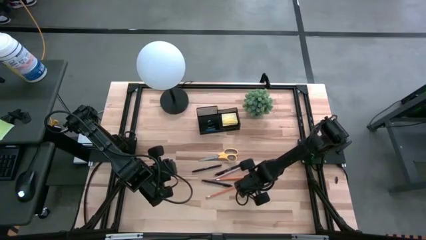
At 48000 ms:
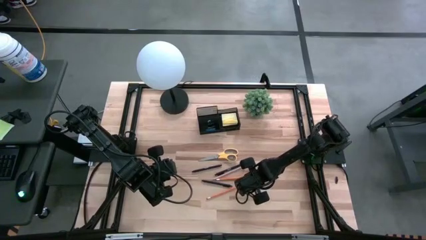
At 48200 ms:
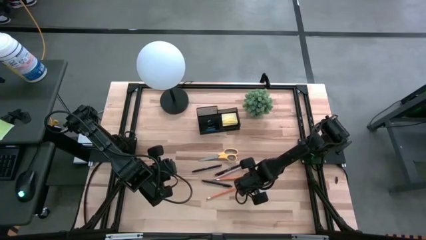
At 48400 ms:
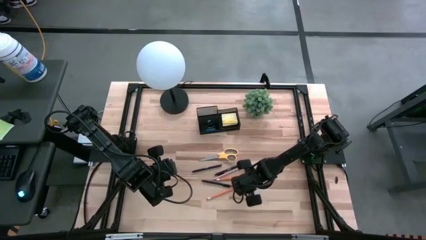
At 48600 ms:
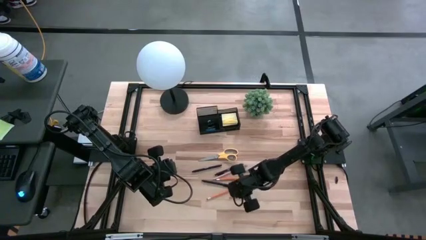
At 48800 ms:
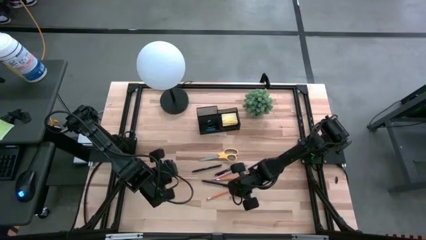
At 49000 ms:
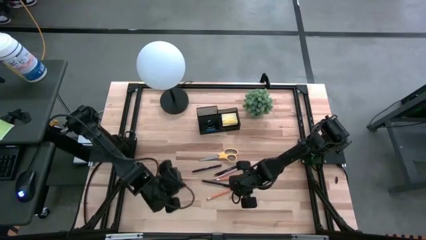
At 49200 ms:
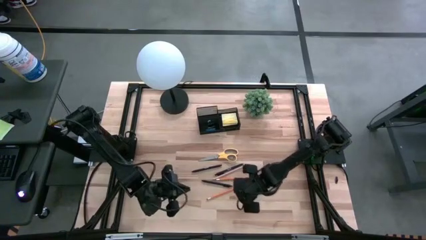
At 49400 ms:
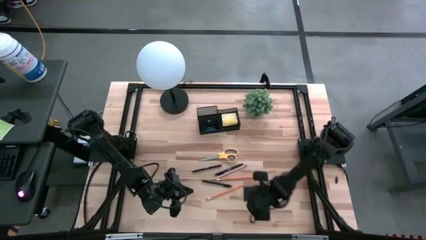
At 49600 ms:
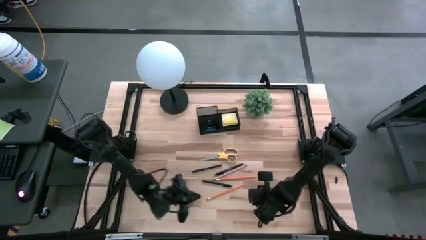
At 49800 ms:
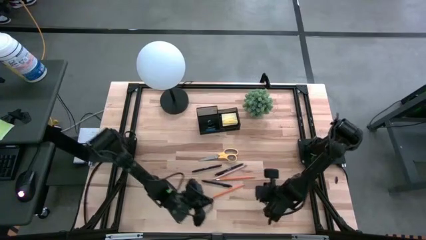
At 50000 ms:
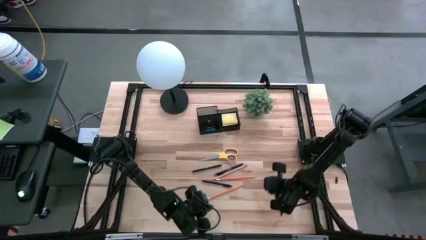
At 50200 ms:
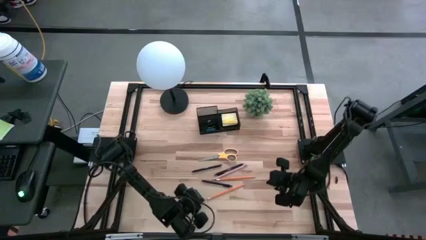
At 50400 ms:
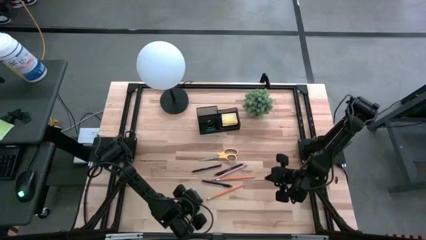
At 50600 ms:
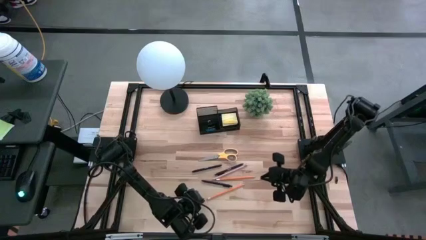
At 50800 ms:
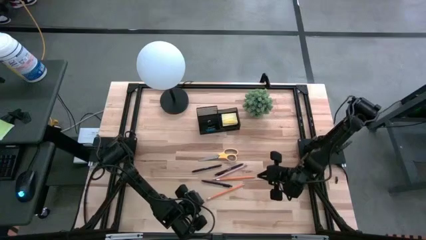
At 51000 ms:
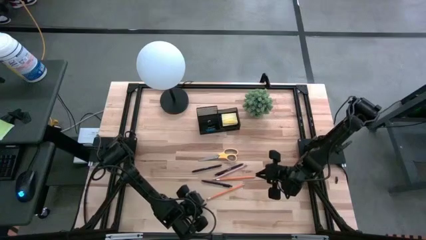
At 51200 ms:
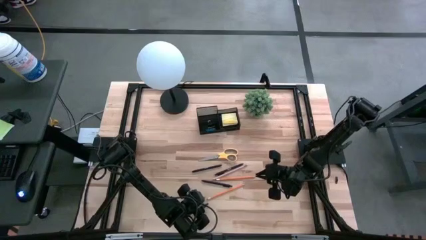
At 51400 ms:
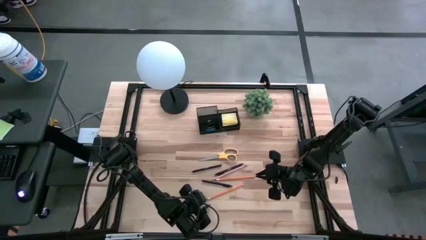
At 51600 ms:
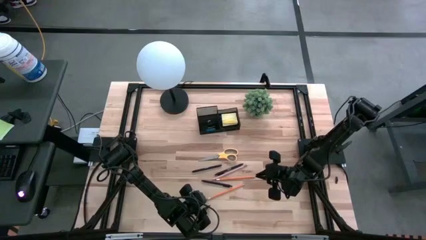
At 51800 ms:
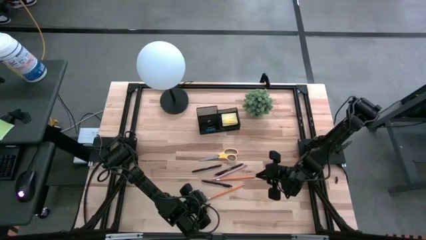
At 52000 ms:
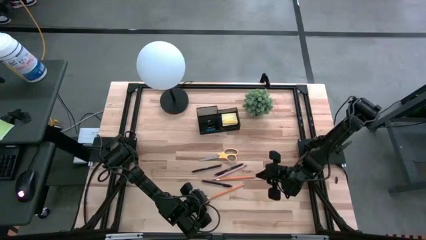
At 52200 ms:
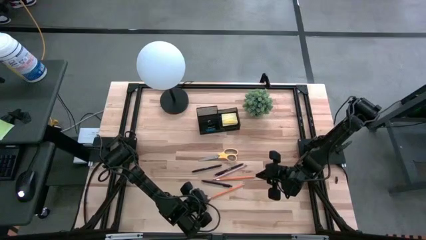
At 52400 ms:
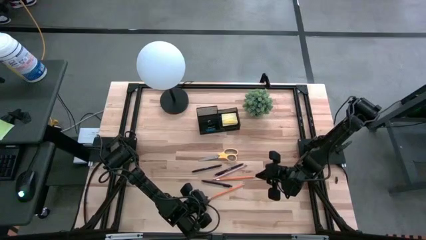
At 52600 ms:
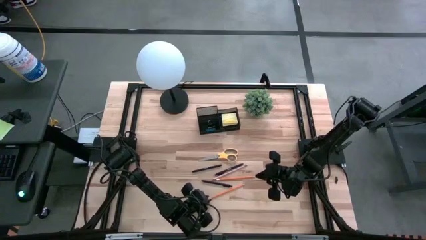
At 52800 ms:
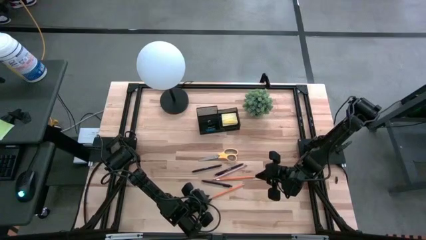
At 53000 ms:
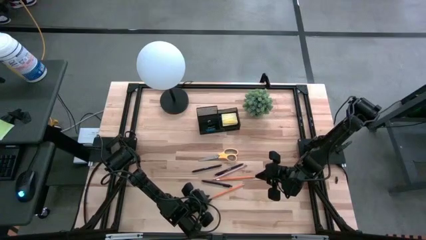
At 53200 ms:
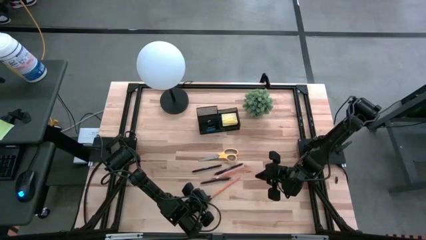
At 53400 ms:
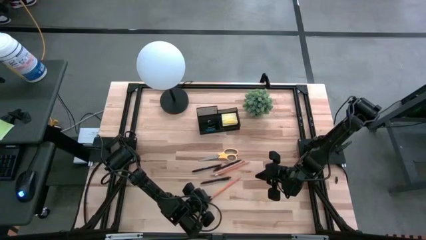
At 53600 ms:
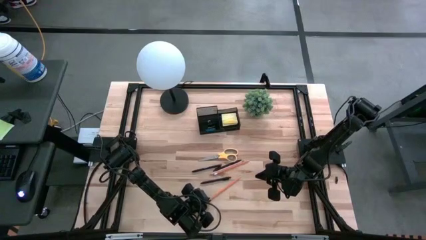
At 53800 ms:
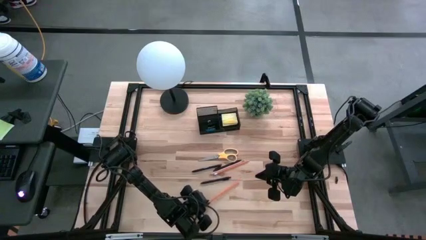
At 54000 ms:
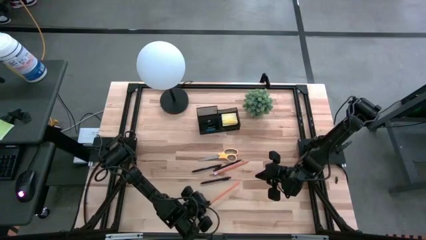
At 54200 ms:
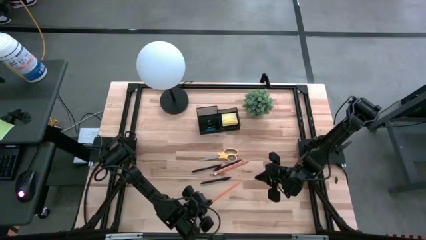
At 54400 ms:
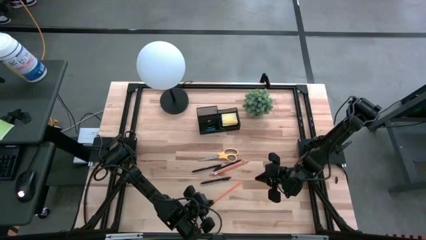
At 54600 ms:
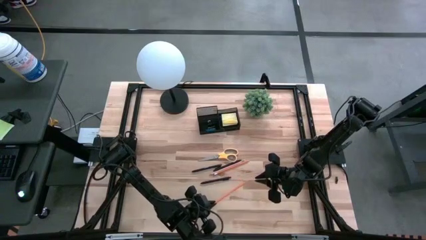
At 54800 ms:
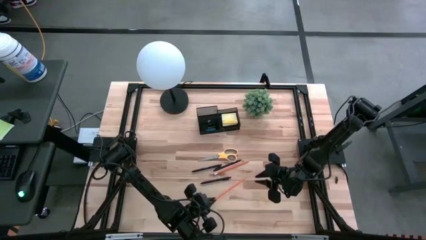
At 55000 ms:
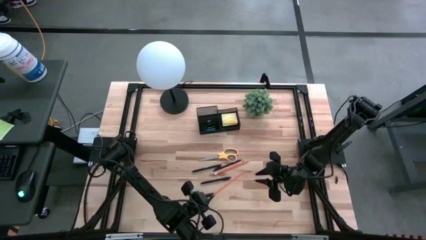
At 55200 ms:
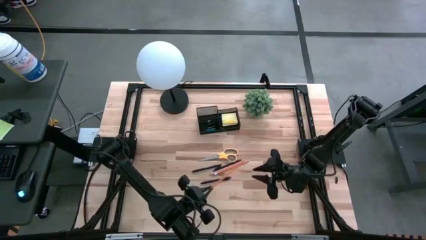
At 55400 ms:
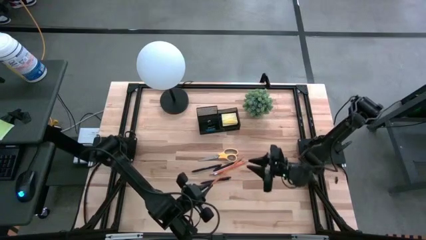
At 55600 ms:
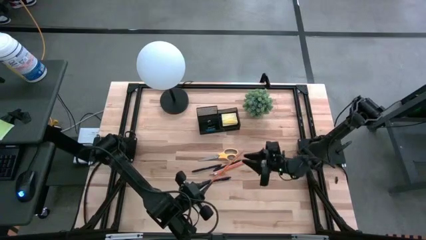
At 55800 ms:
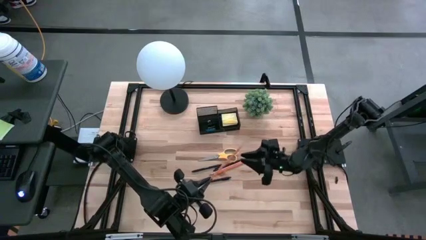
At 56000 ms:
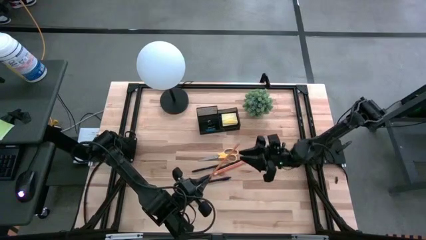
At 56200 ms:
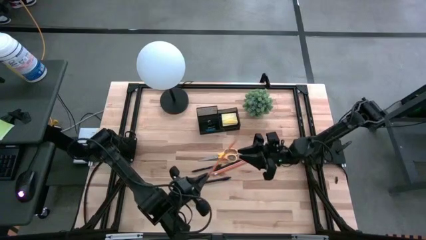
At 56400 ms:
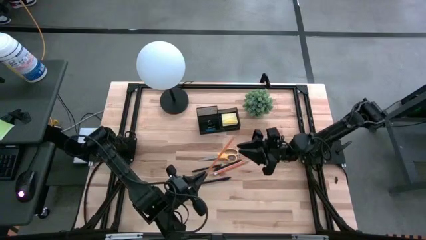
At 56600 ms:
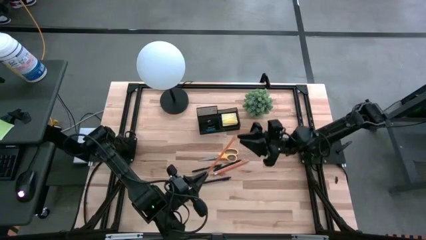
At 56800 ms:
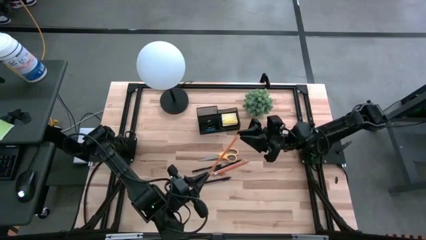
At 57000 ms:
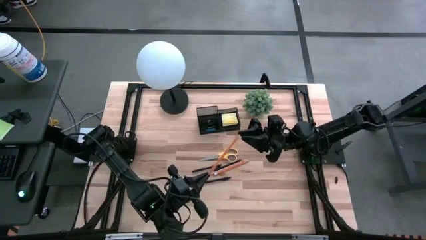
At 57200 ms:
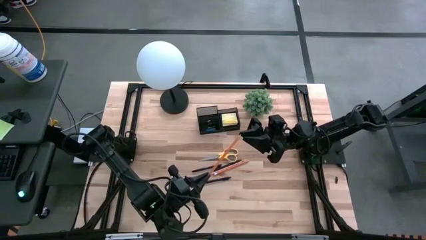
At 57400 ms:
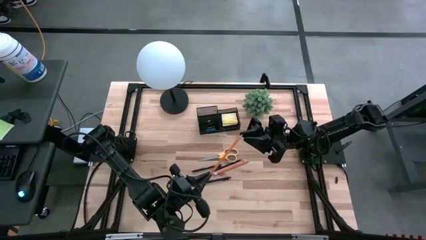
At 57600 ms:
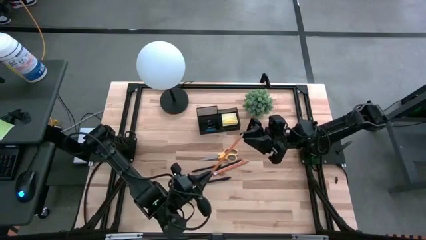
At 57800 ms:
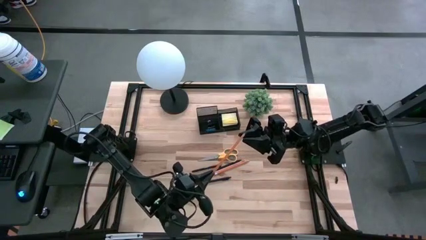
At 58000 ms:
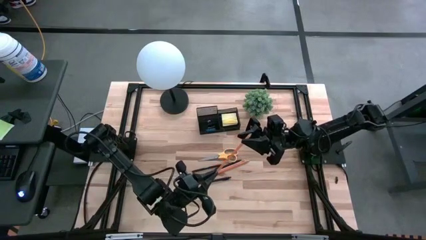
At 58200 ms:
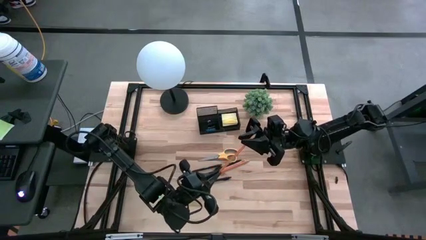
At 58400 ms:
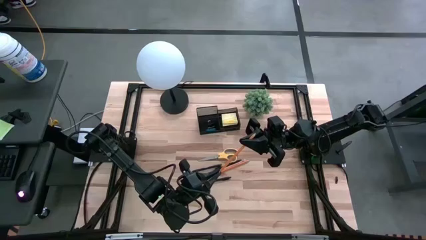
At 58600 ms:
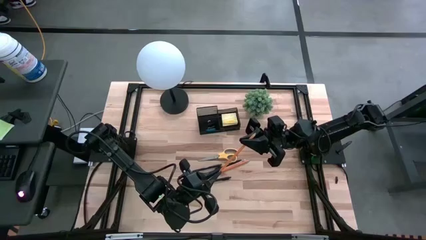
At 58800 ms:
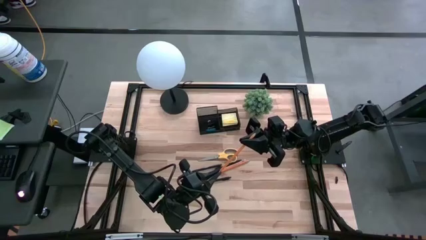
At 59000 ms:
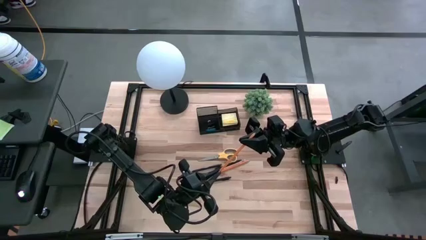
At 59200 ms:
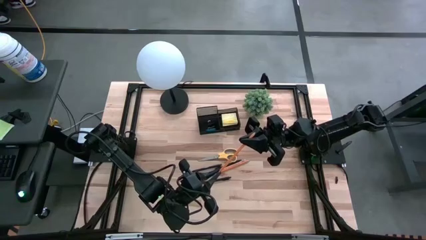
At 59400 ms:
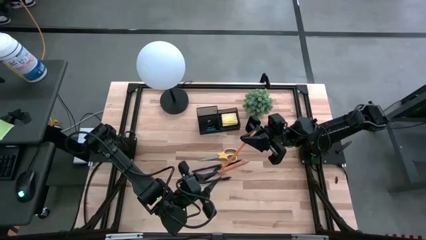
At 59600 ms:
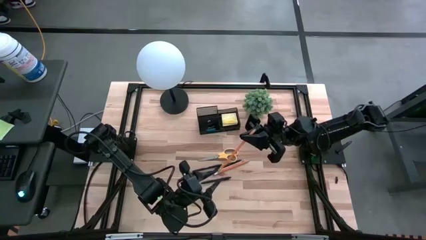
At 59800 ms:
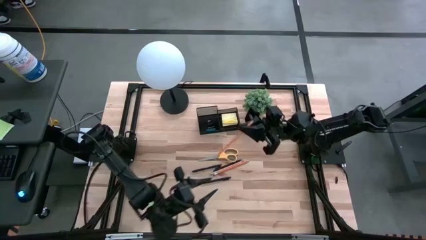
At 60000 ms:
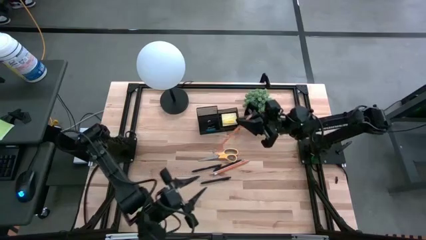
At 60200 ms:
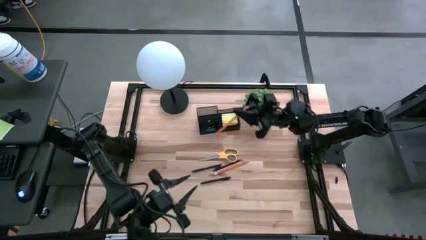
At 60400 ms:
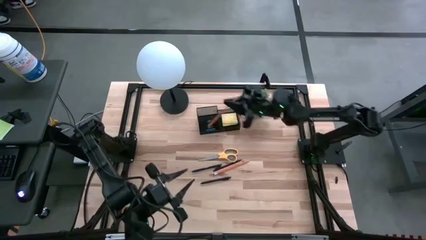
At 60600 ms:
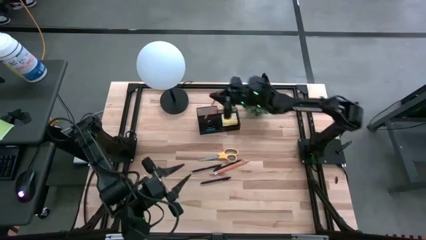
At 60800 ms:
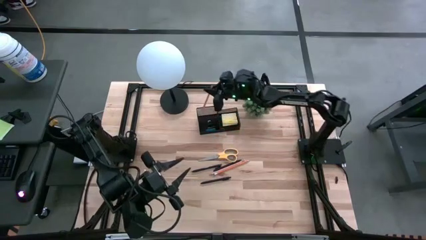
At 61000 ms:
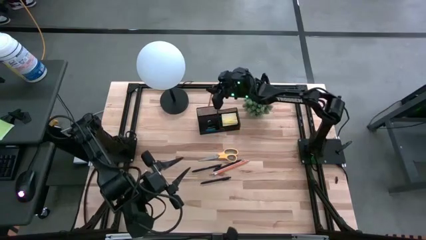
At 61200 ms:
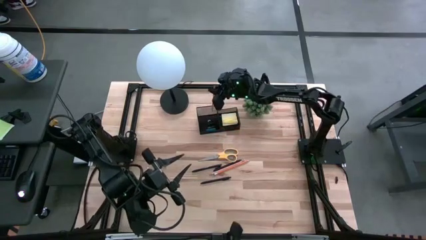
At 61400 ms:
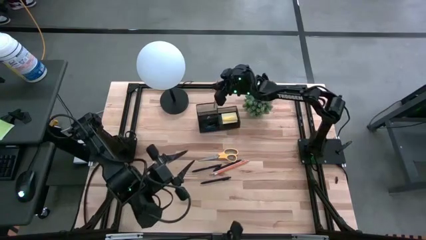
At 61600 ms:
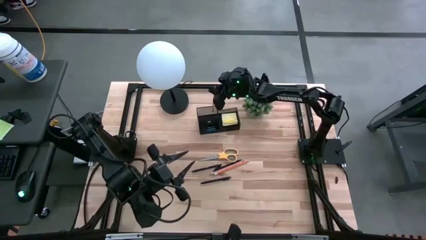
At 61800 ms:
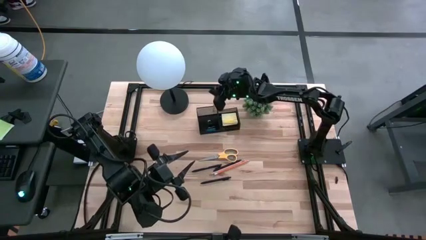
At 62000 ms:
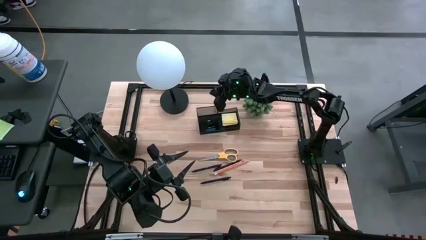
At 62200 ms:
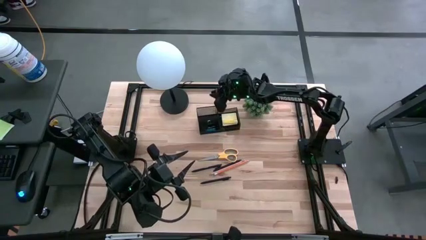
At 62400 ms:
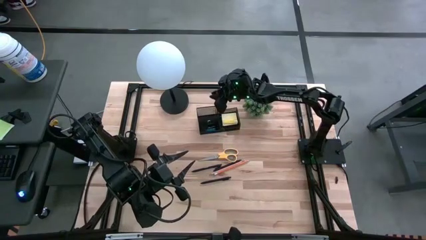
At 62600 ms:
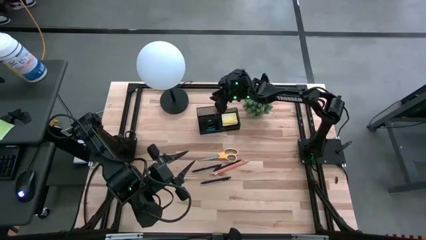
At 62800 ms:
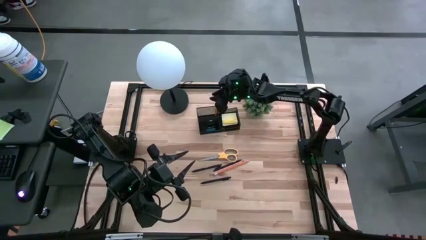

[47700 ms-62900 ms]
Task: Pick and place office supplies into organizer
Put the bottom orange pencil into the desk organizer

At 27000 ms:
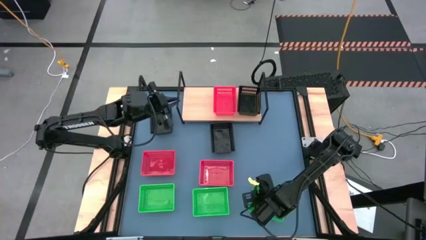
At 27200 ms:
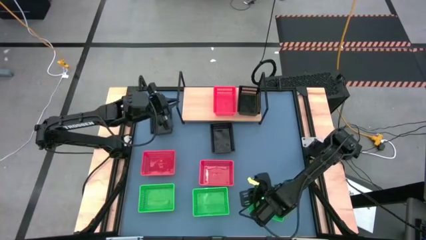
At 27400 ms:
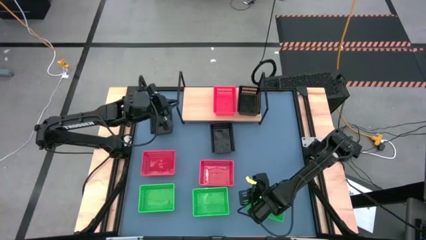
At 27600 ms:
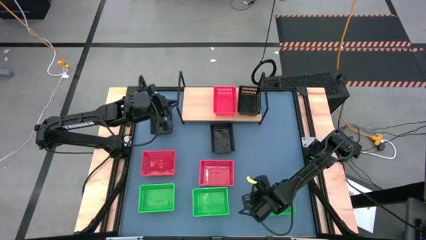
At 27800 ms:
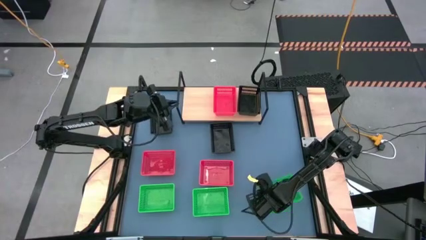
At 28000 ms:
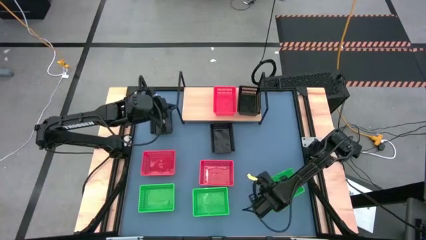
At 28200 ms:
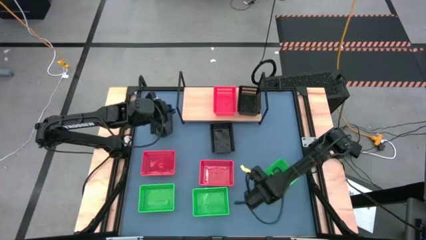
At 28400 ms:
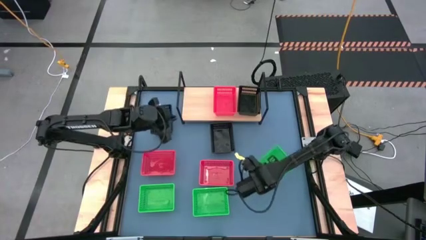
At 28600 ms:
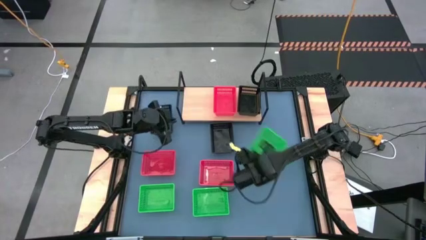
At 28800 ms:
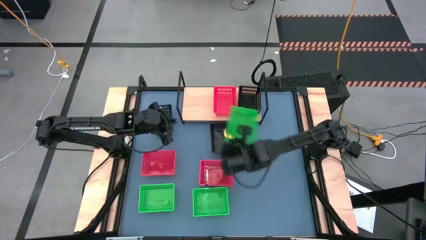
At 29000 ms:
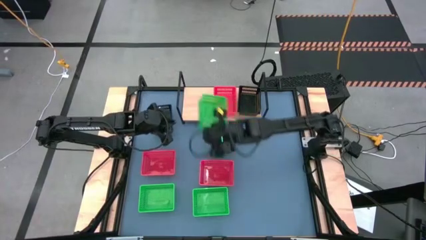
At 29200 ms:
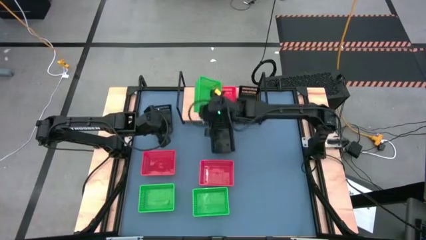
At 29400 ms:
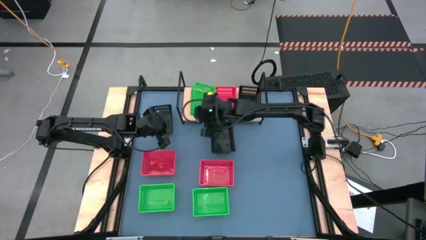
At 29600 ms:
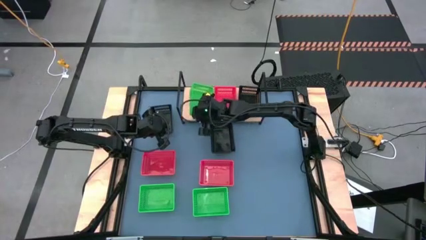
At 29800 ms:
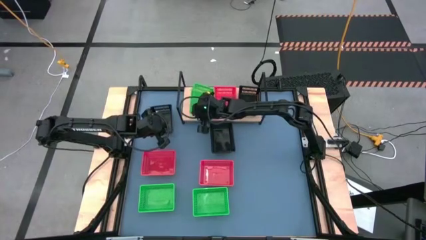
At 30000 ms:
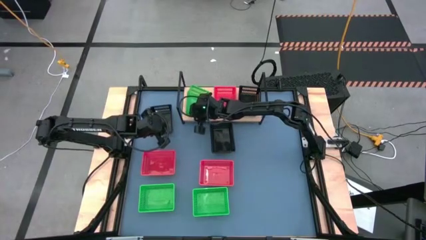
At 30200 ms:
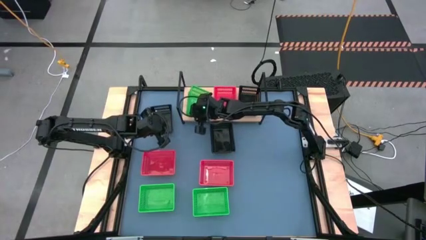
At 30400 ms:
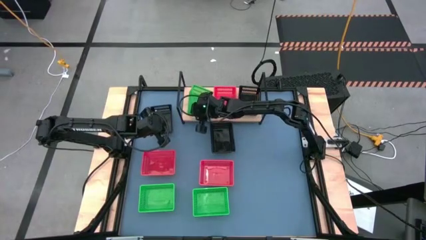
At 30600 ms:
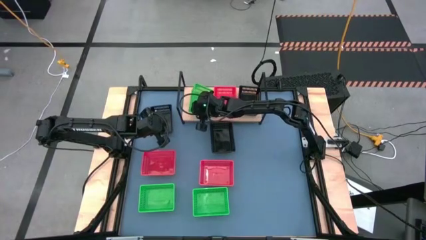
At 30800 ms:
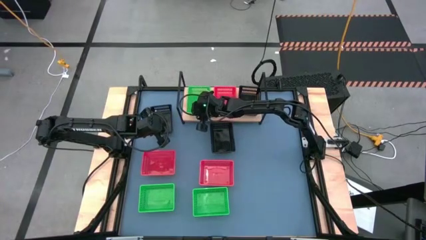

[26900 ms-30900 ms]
Task: Stack baskets on shelf by color
Put the right green bin on the shelf
